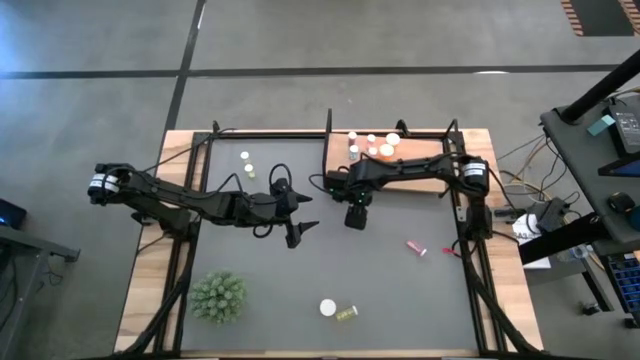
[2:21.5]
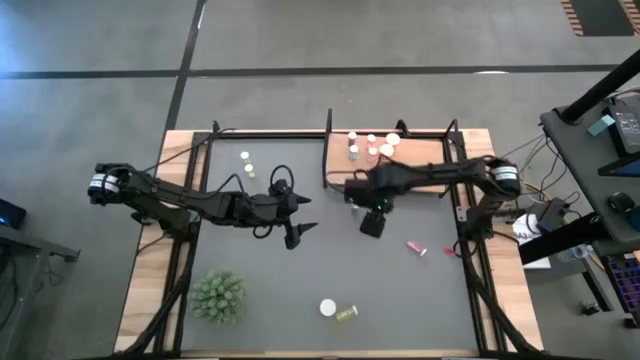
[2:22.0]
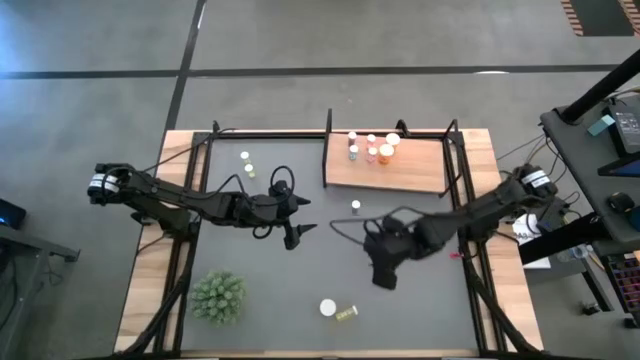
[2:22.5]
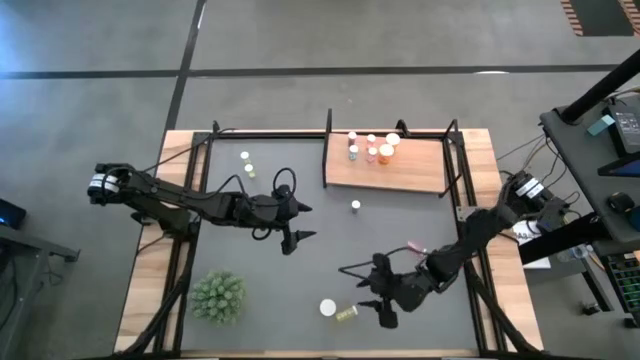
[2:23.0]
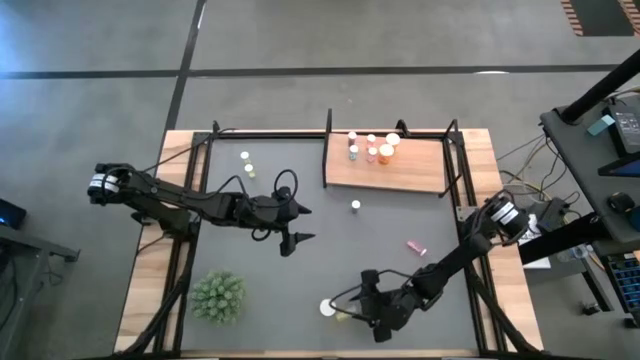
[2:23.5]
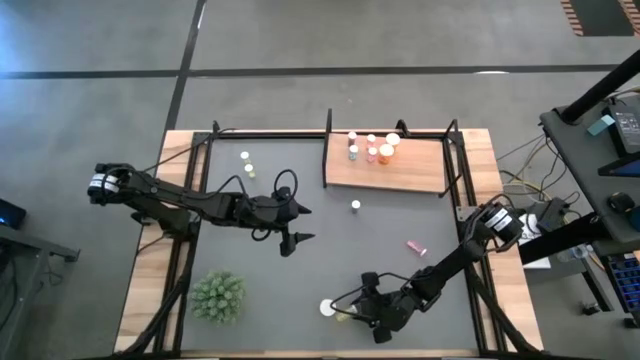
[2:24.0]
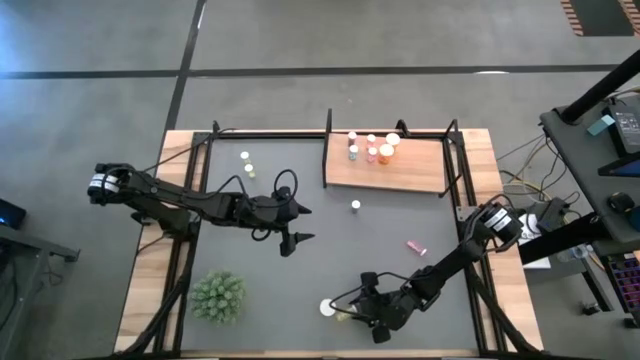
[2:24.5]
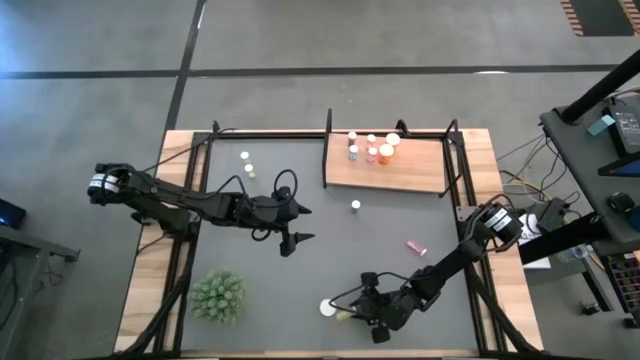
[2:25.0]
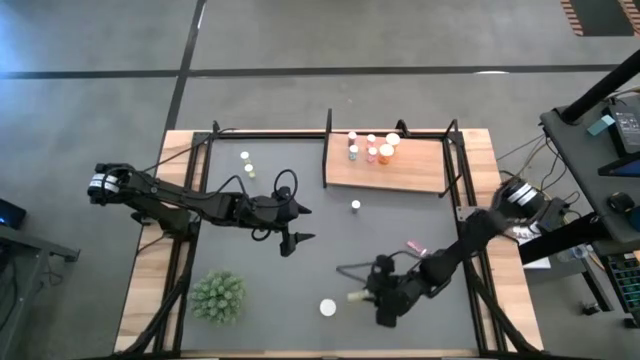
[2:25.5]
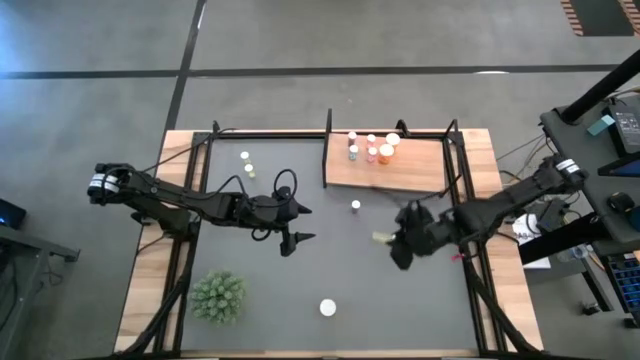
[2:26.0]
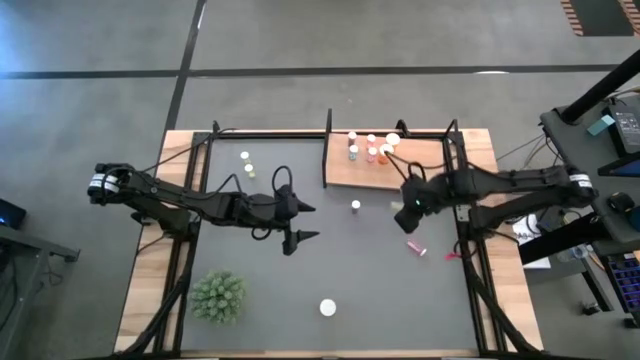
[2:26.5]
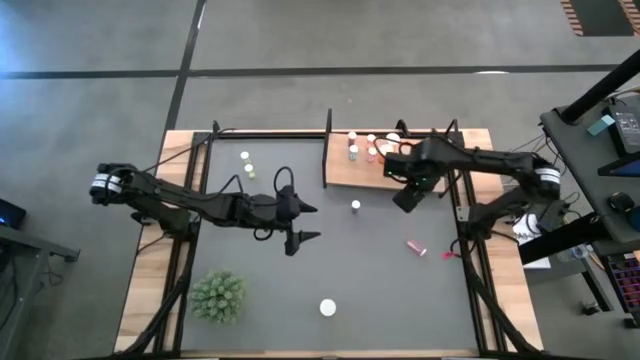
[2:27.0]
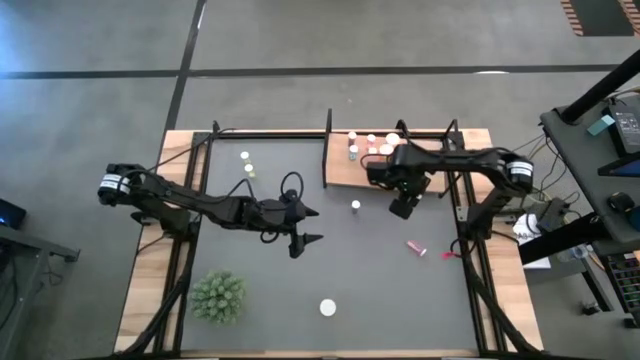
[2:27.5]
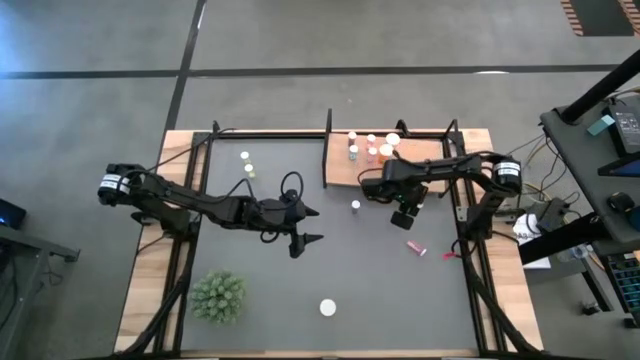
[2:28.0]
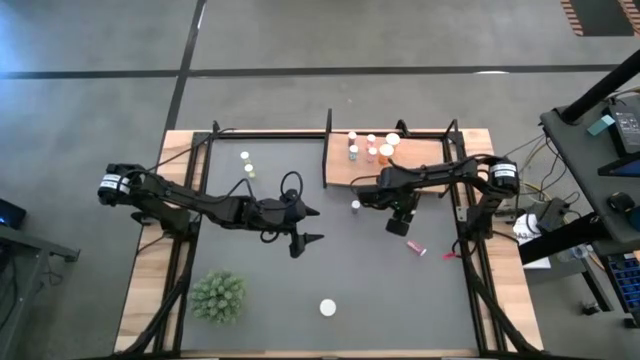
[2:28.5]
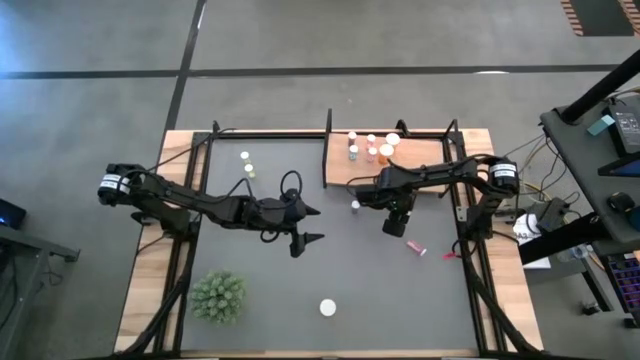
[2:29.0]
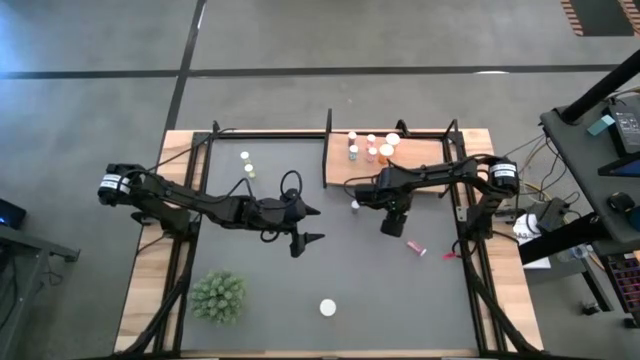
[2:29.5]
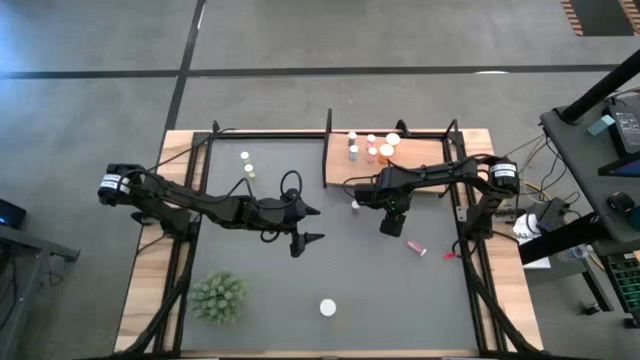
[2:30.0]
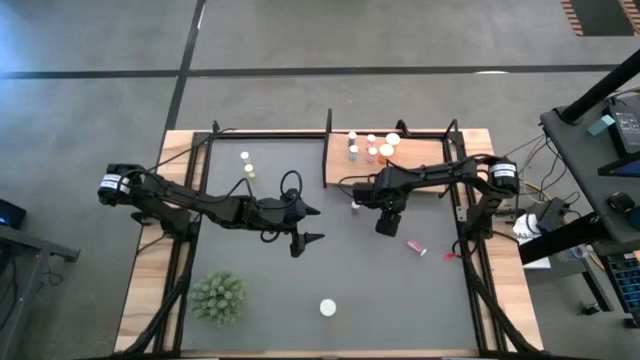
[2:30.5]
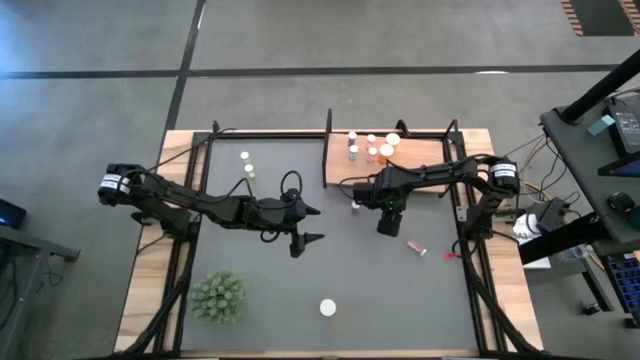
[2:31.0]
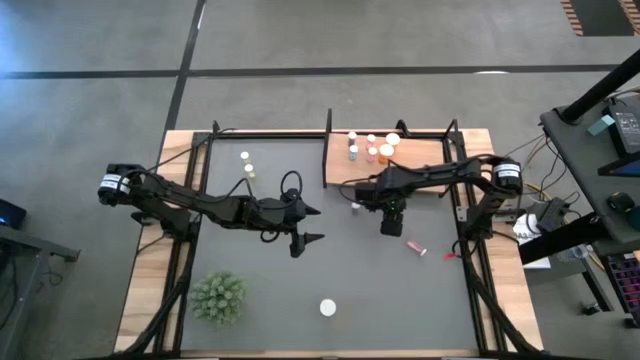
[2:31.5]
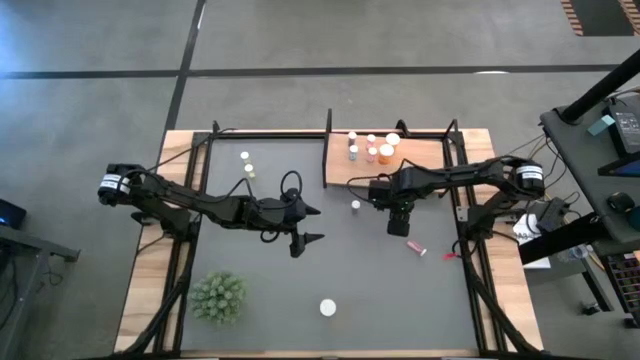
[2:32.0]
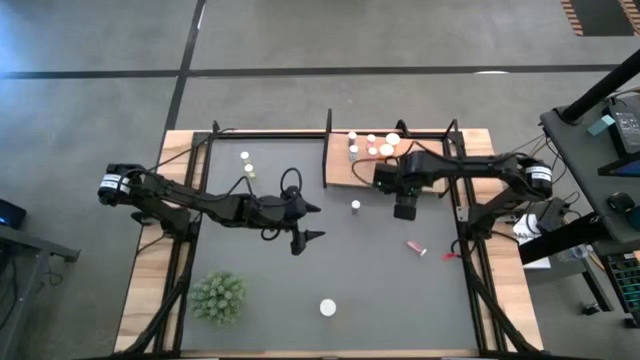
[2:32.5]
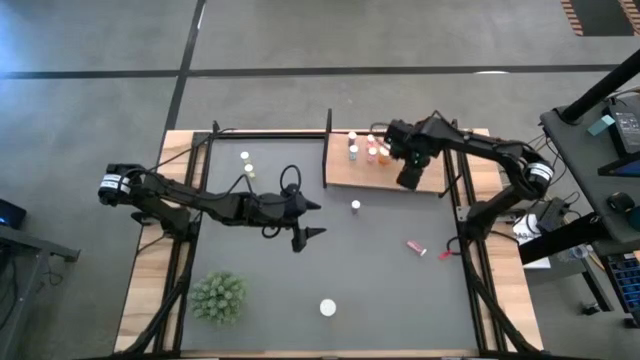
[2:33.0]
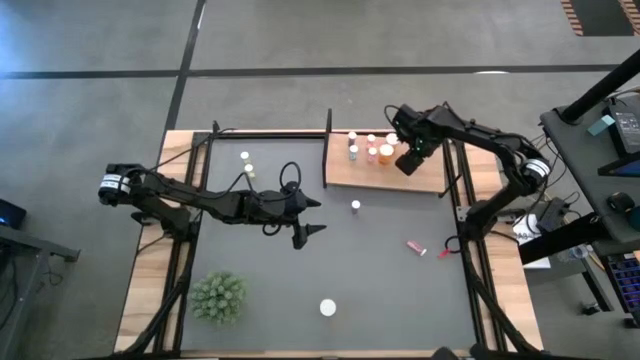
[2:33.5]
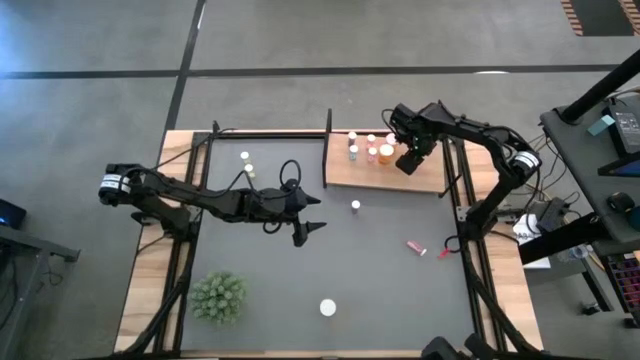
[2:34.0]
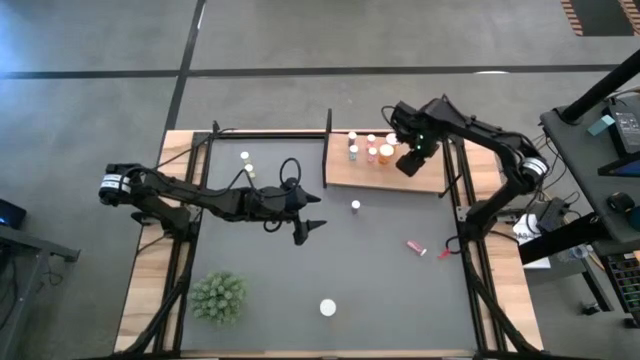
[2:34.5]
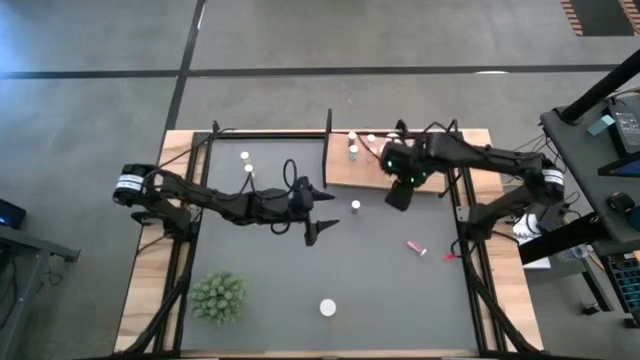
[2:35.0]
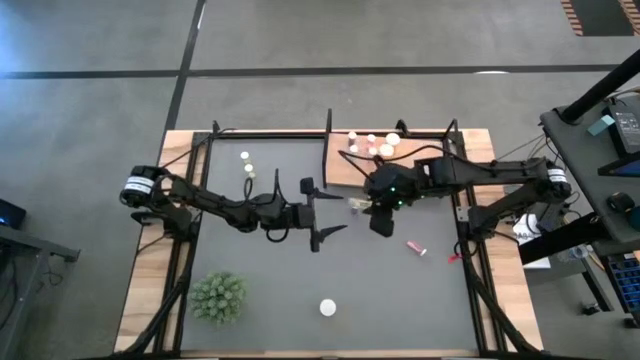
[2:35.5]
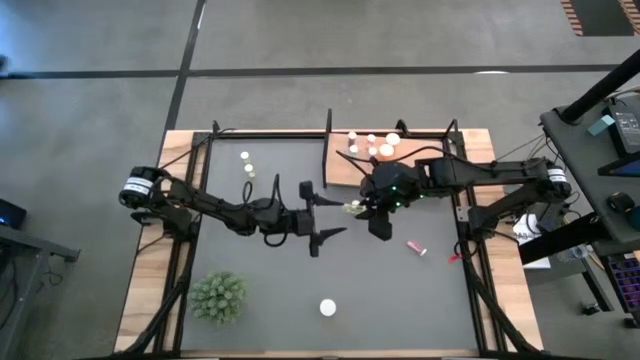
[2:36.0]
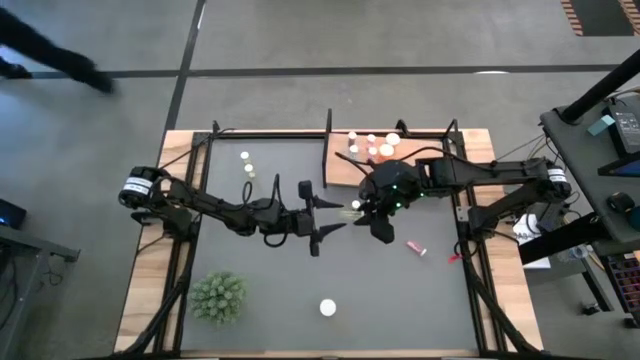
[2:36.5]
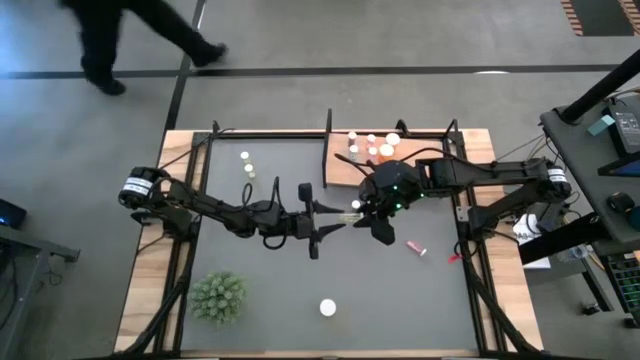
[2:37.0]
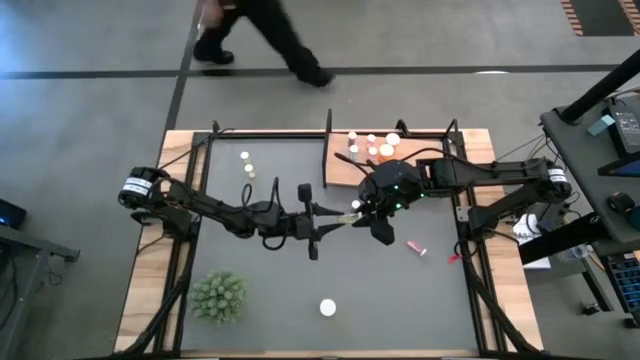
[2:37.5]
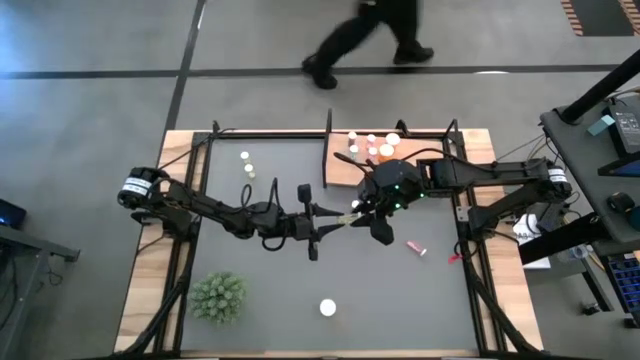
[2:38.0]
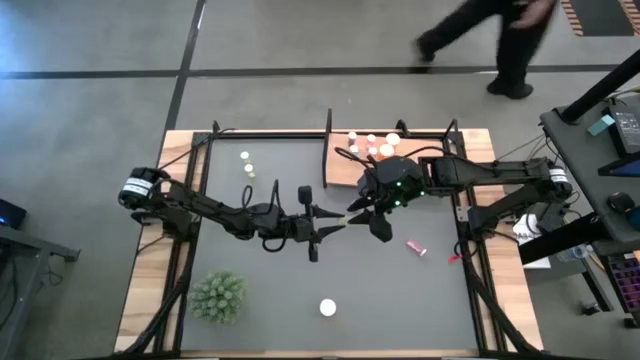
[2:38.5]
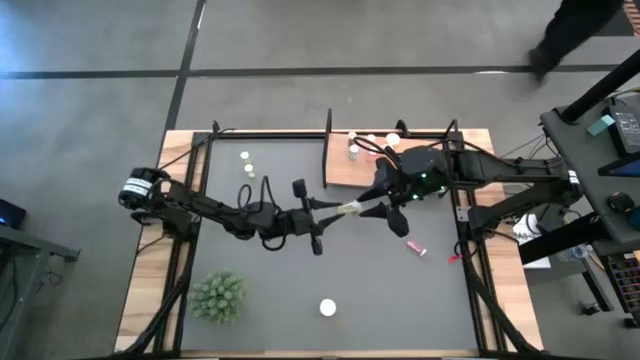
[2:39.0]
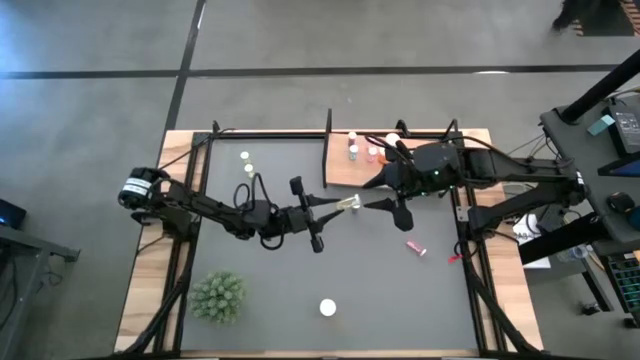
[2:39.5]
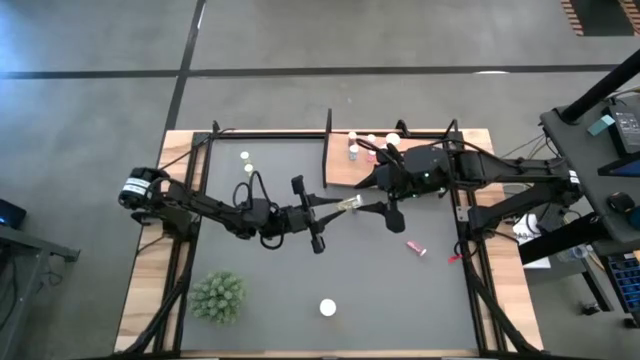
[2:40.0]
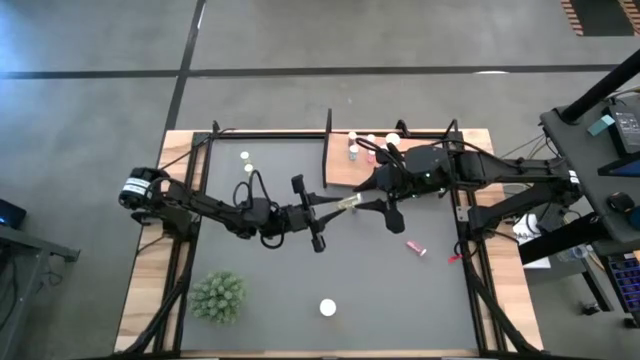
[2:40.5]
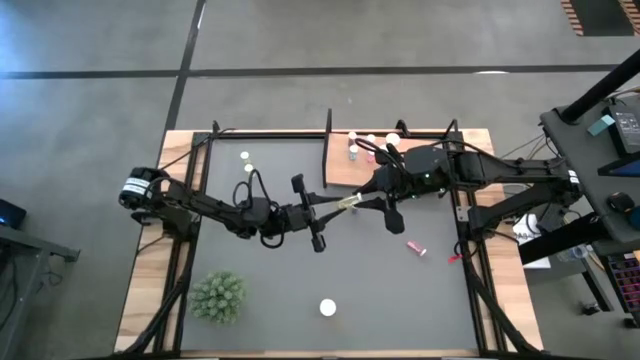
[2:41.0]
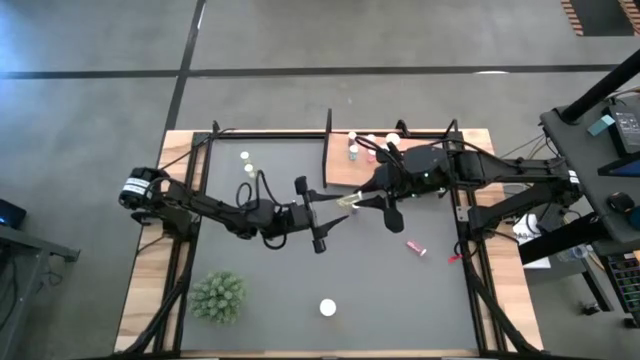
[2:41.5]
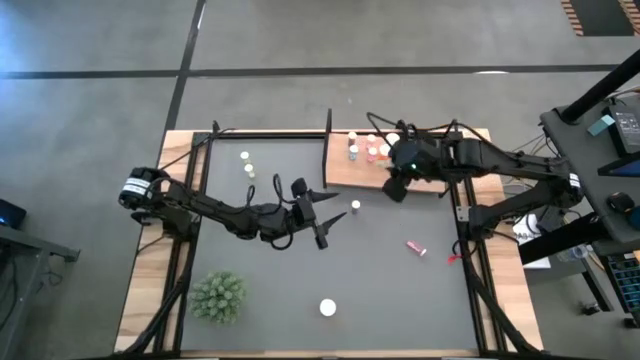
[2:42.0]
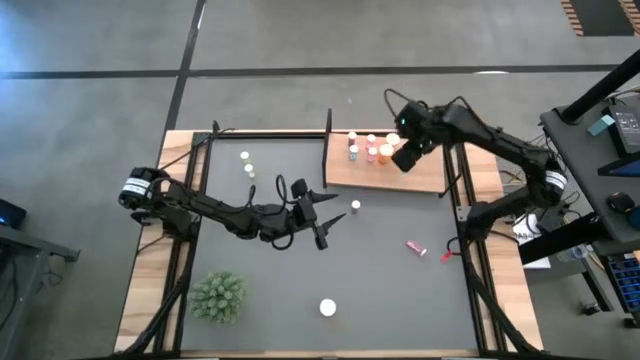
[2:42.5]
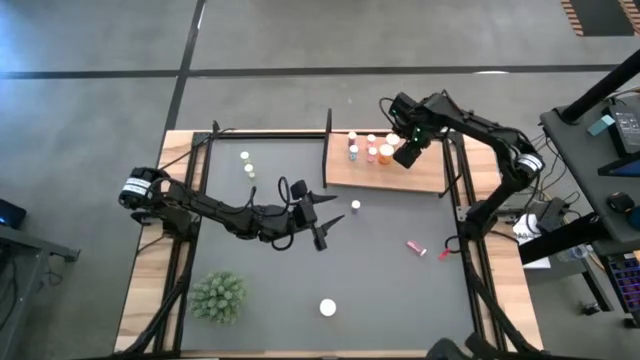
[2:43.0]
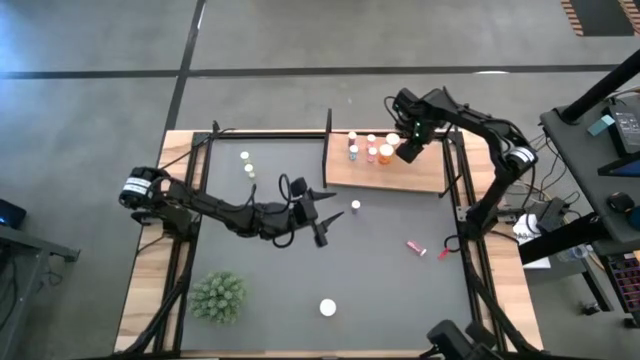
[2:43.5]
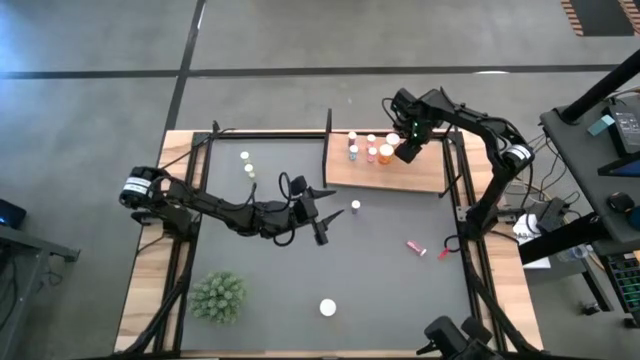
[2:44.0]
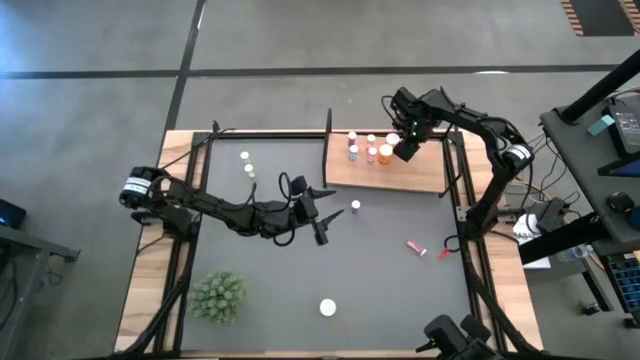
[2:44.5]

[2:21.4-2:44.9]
Task: Pick and place medicine bottles onto shelf by color
Put the bottom yellow pill bottle on the shelf
